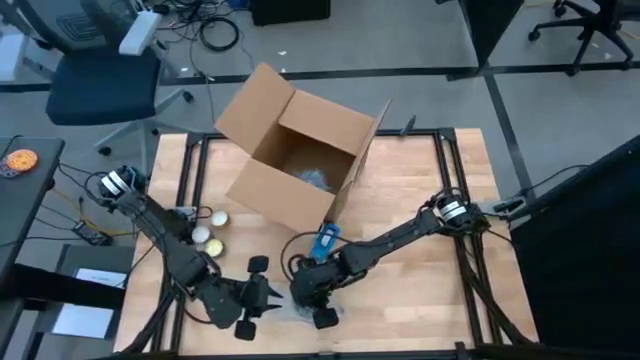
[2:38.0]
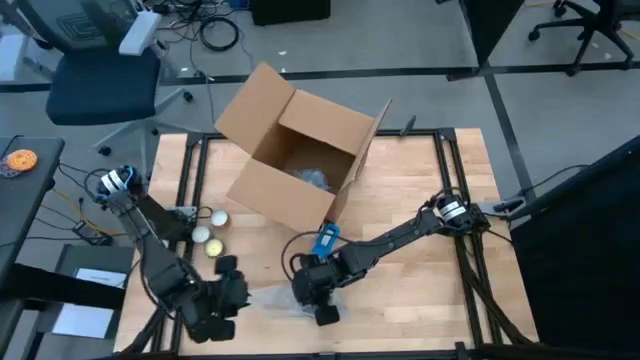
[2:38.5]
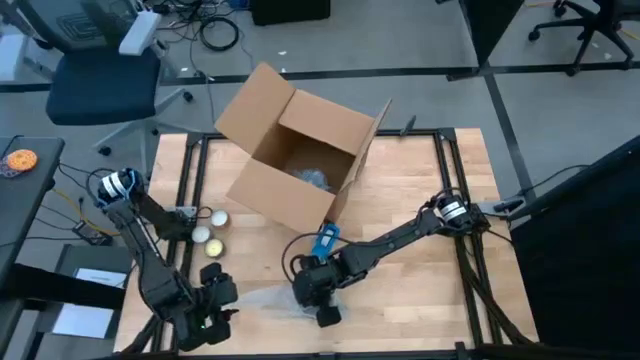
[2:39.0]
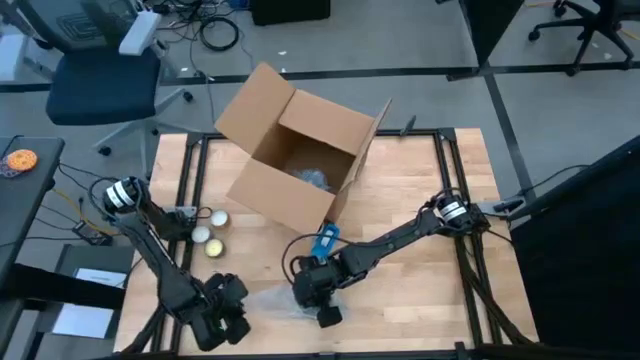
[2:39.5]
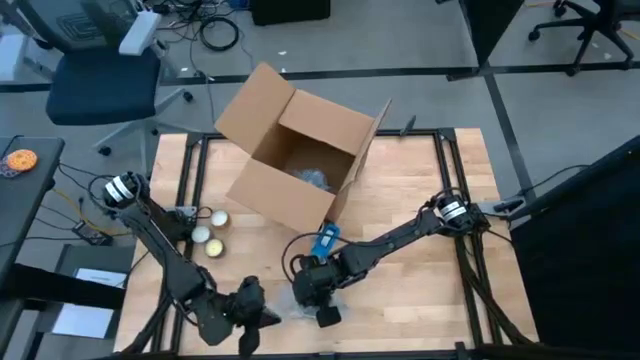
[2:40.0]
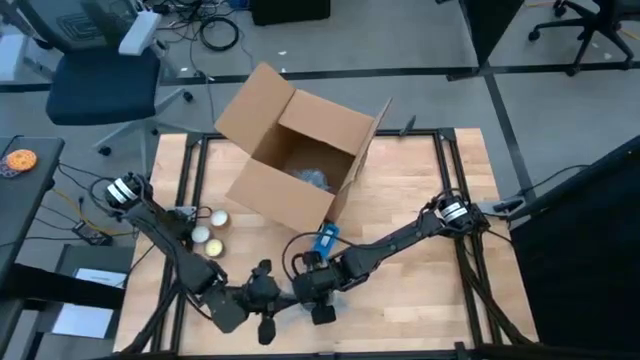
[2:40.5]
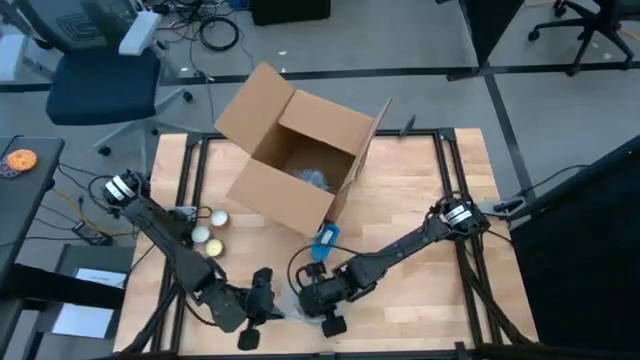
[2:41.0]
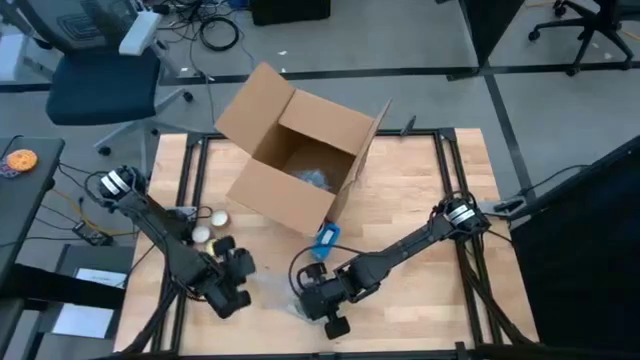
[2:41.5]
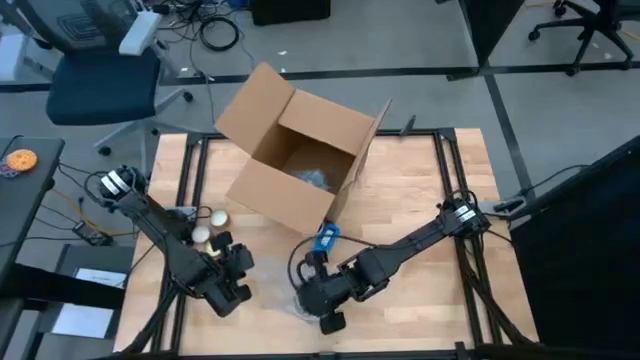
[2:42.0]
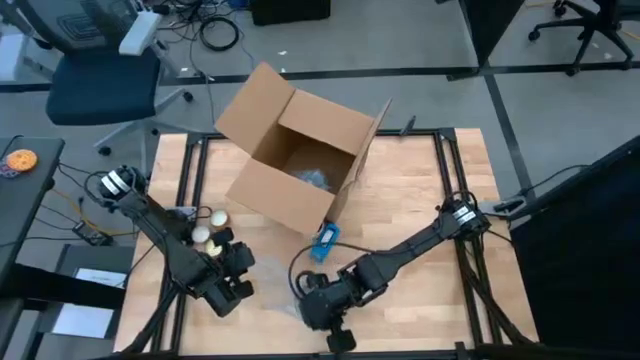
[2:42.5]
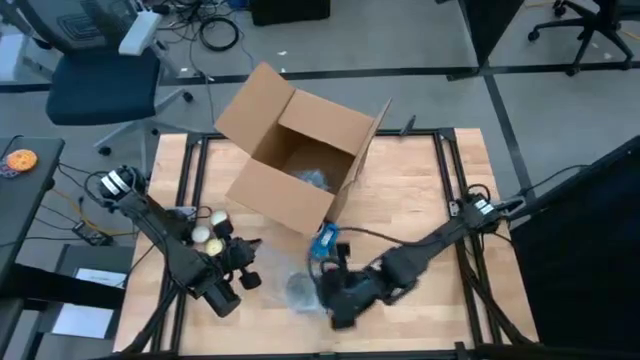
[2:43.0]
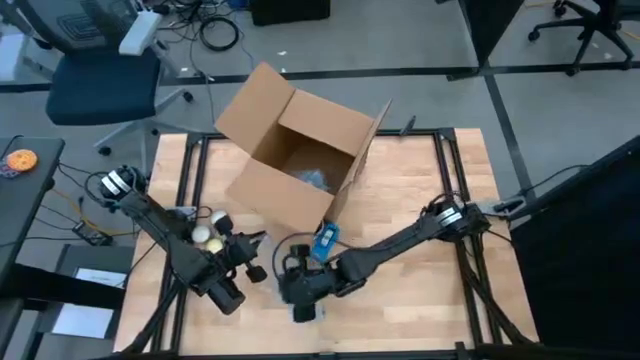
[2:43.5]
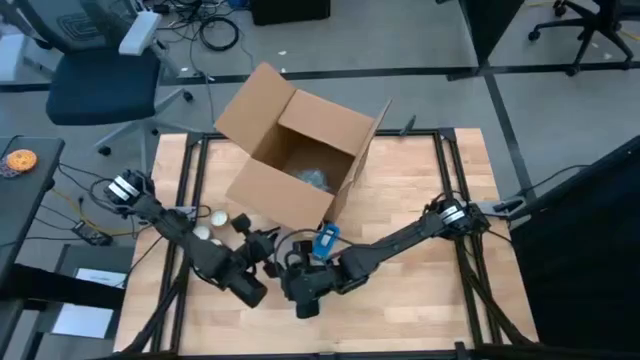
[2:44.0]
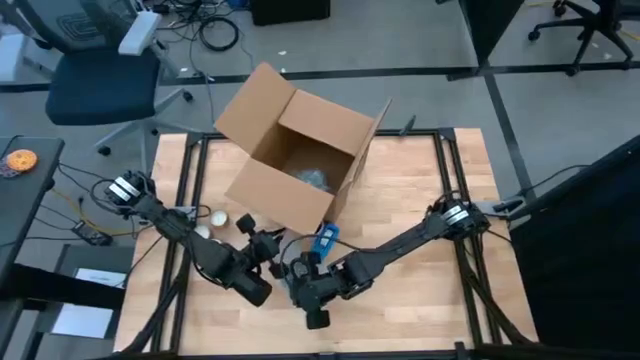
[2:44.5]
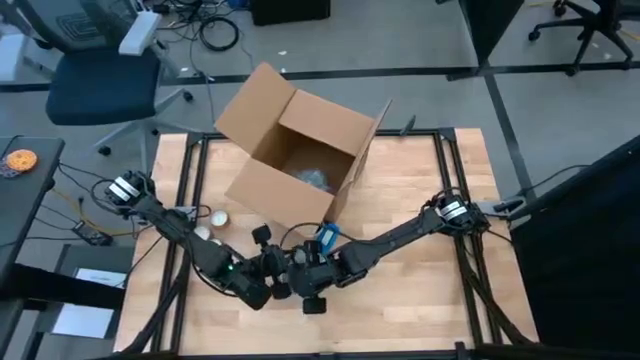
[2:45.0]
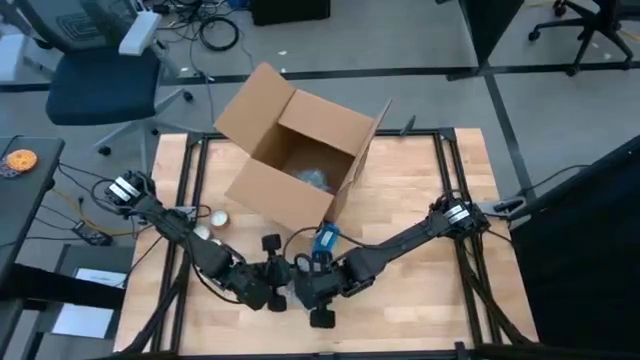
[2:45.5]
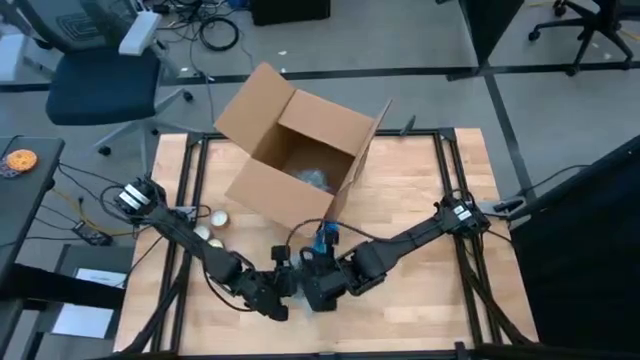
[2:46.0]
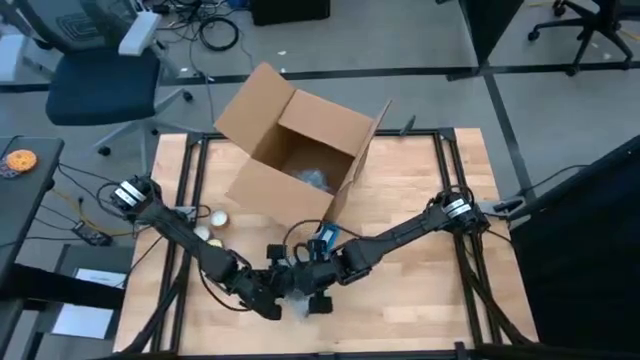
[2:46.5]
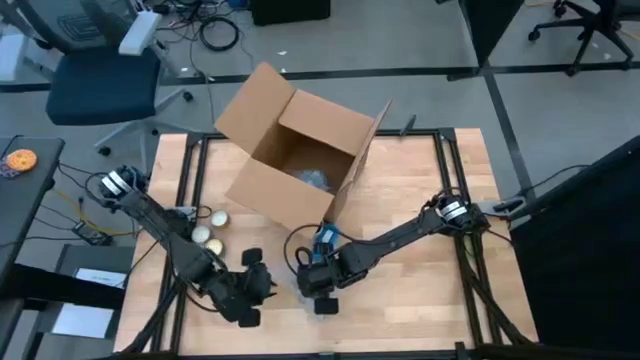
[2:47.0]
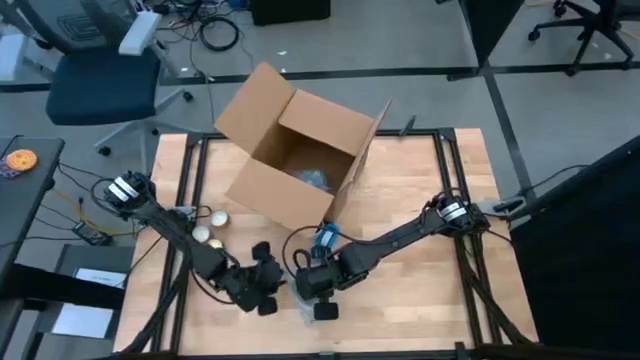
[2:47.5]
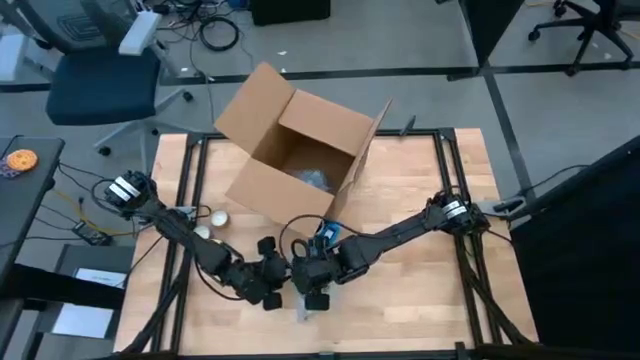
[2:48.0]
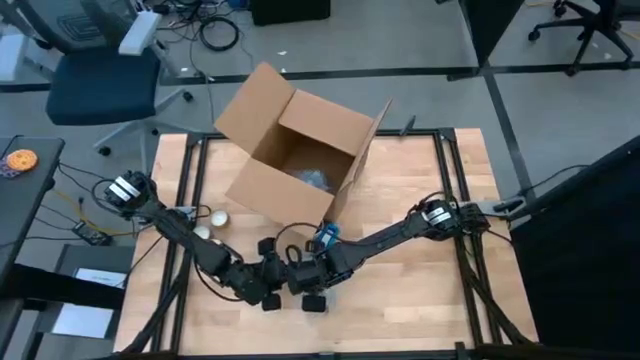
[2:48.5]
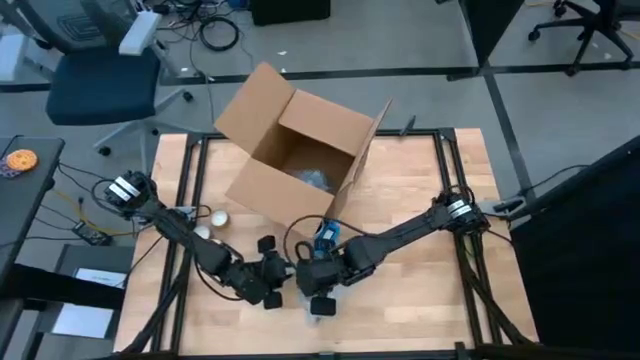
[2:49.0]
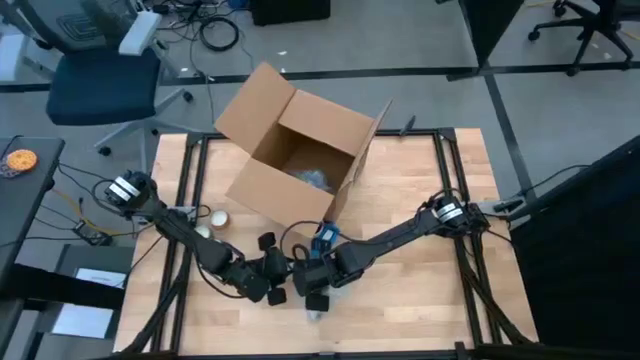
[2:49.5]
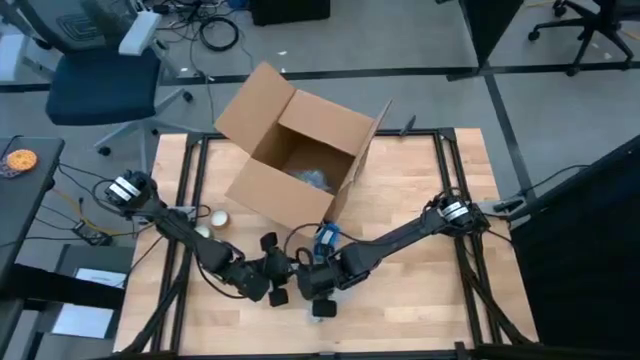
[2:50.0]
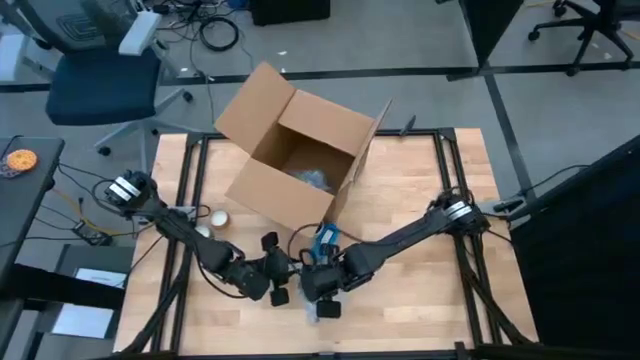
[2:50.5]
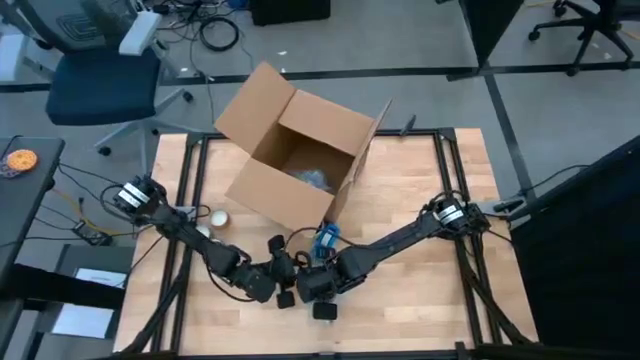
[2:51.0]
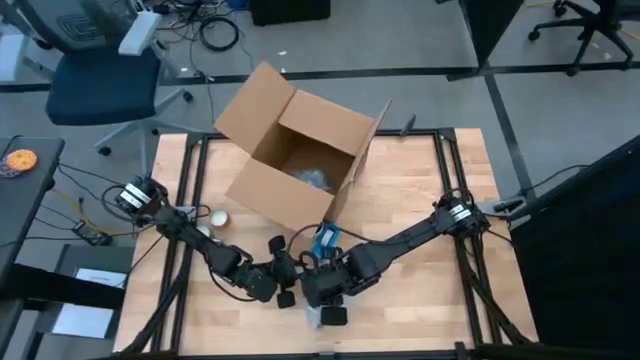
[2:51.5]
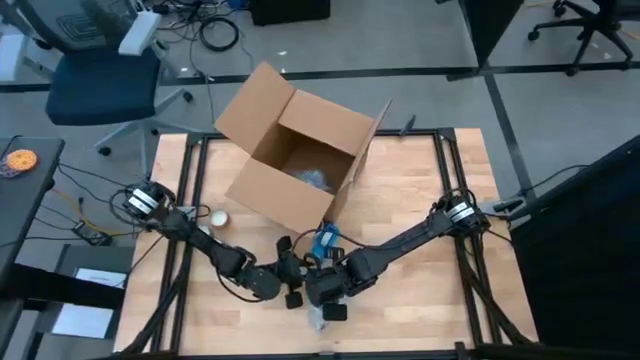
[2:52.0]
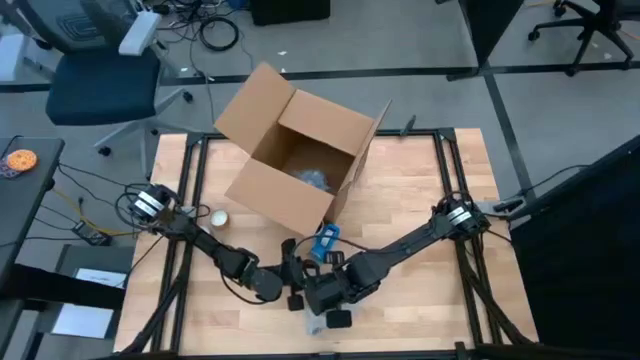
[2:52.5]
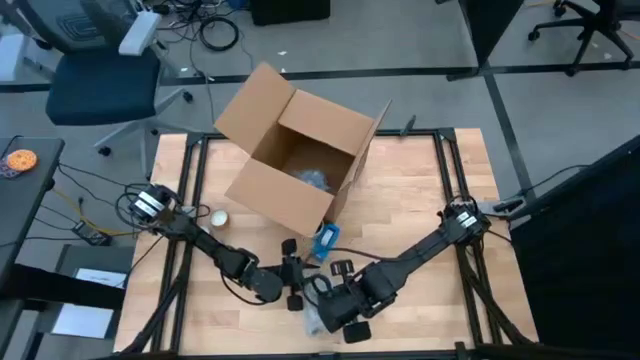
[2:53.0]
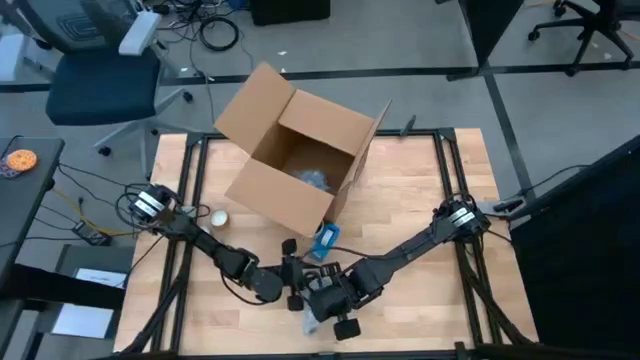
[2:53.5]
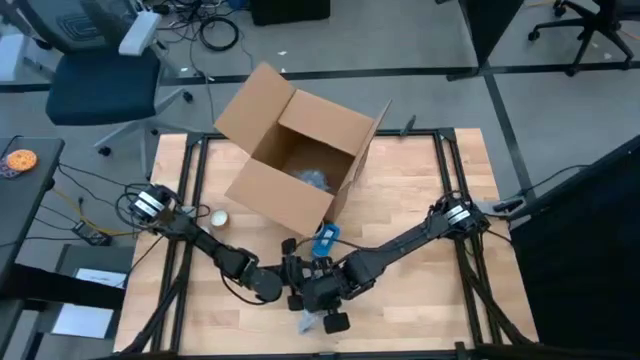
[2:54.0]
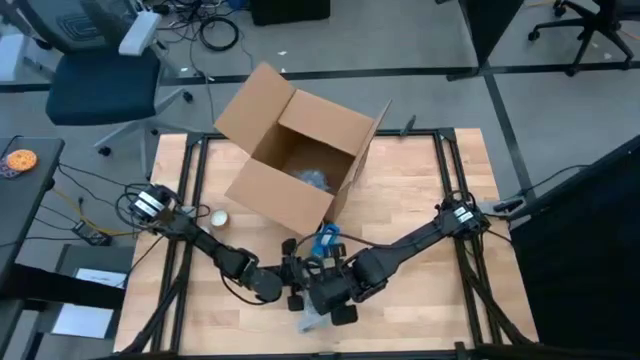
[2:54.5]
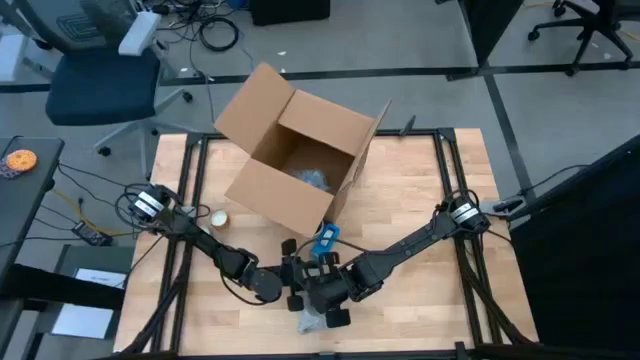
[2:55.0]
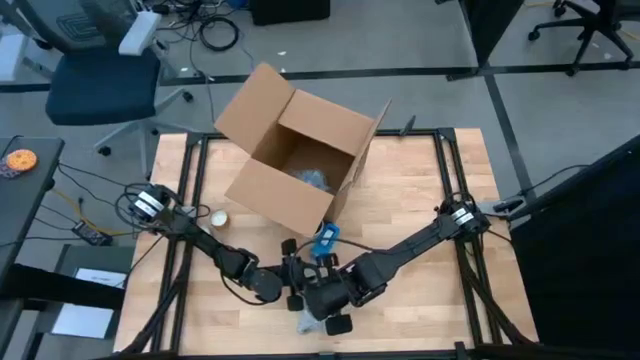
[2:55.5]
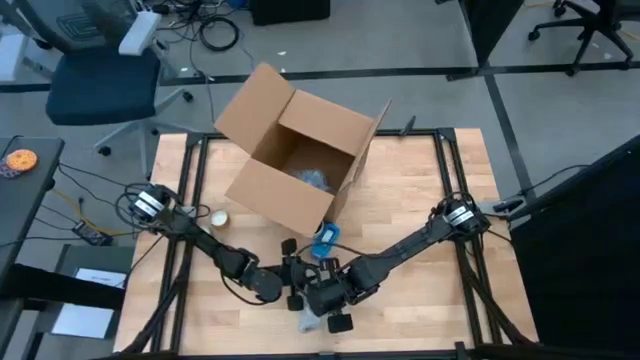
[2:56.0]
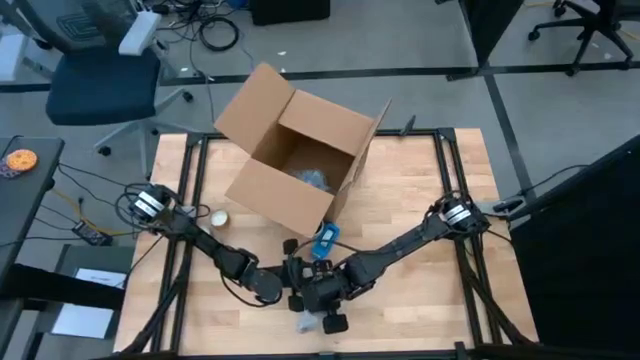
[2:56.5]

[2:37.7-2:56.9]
Task: wrap mug
Wrap the brown mug with the bubble wrap on the table
